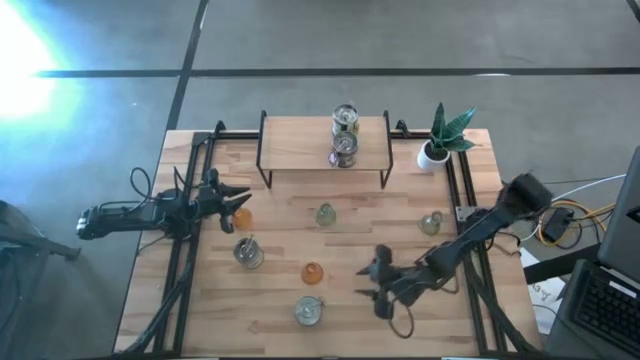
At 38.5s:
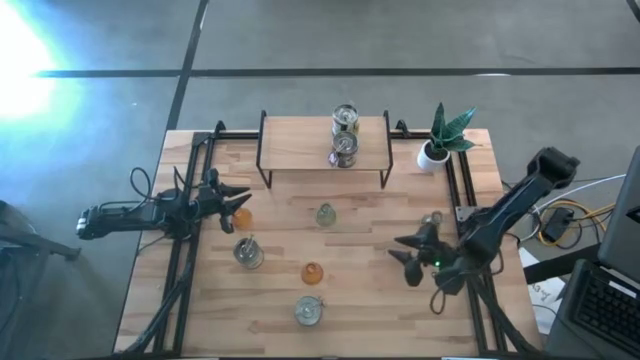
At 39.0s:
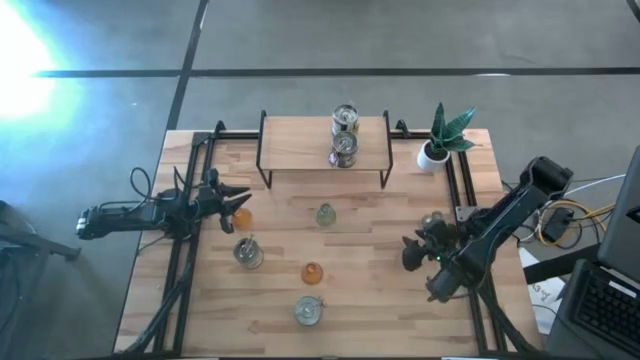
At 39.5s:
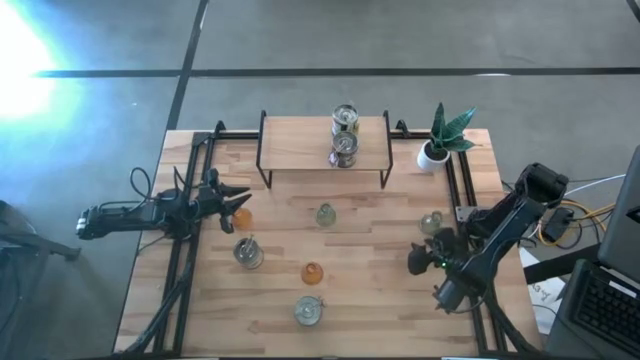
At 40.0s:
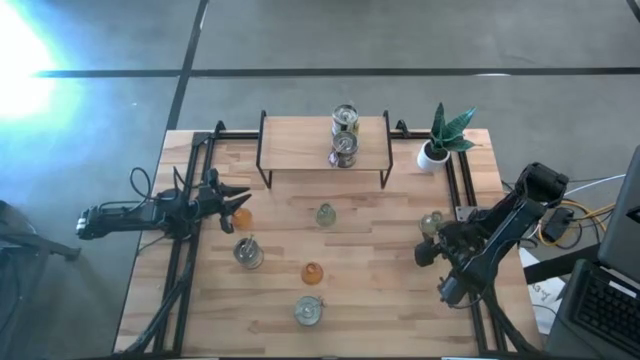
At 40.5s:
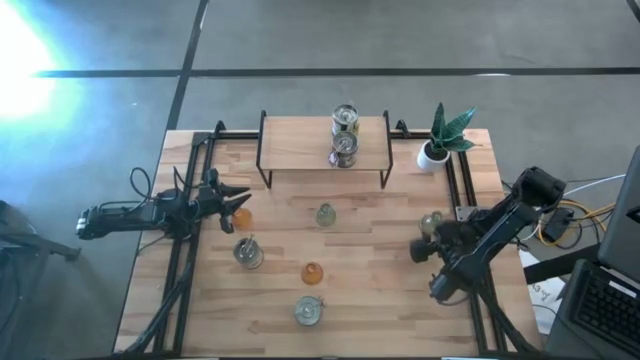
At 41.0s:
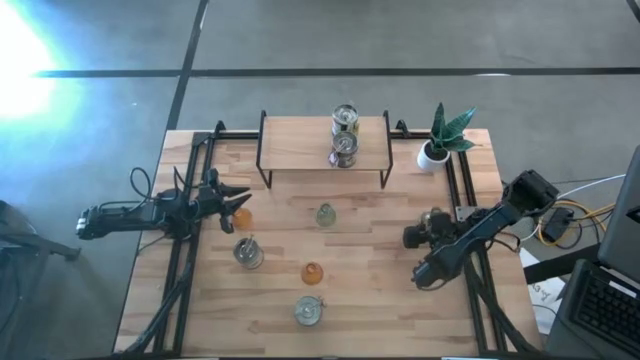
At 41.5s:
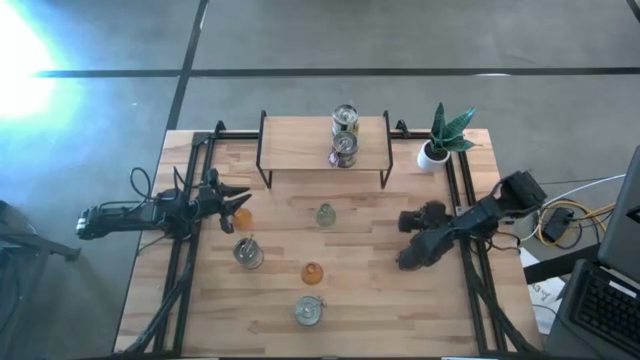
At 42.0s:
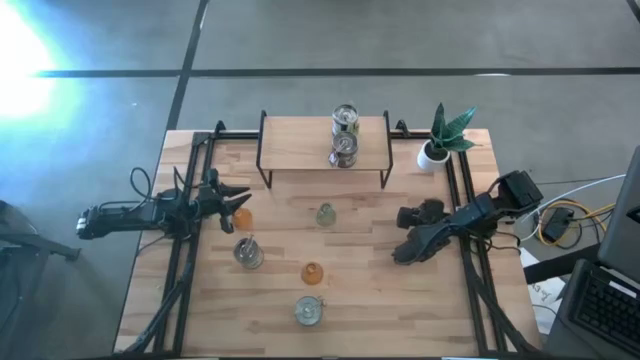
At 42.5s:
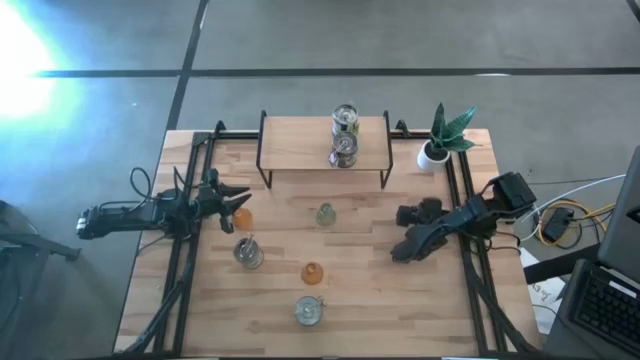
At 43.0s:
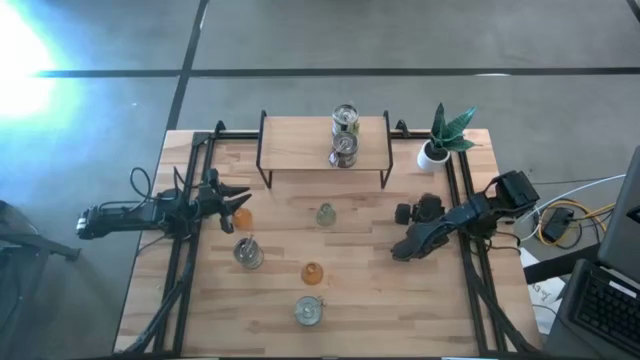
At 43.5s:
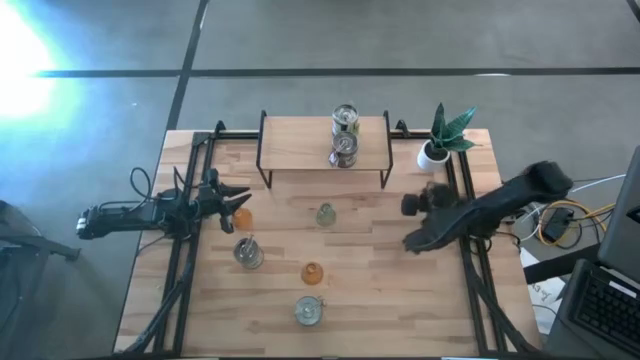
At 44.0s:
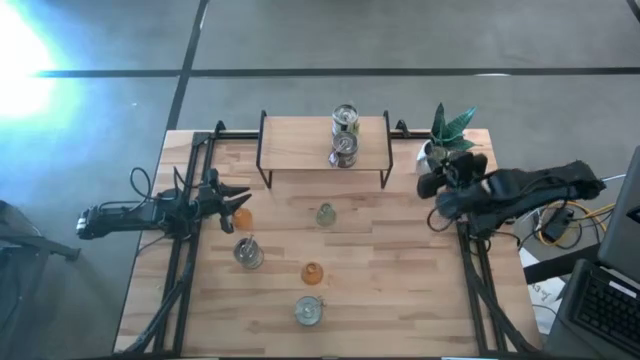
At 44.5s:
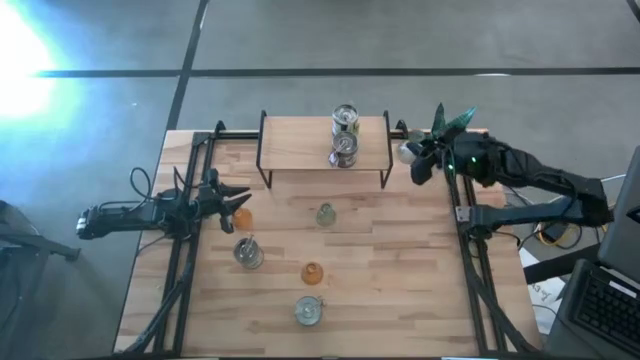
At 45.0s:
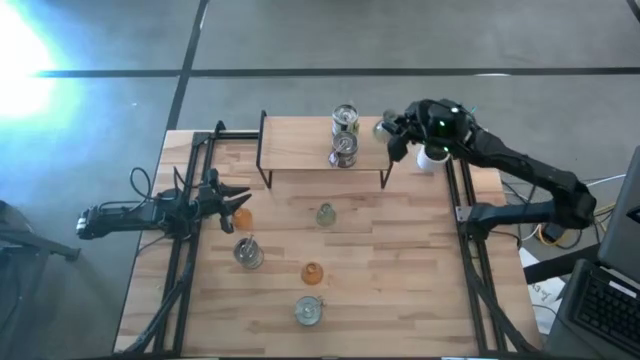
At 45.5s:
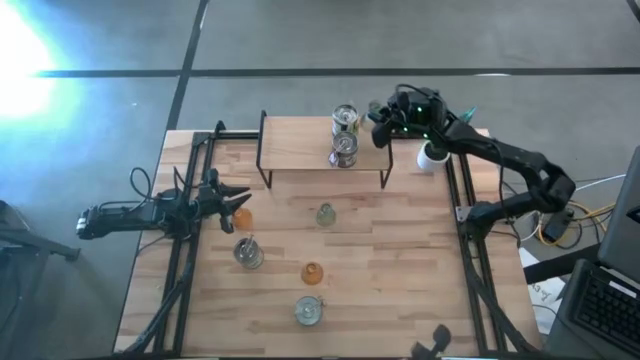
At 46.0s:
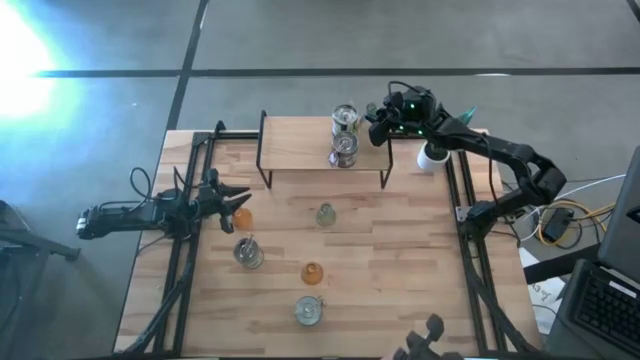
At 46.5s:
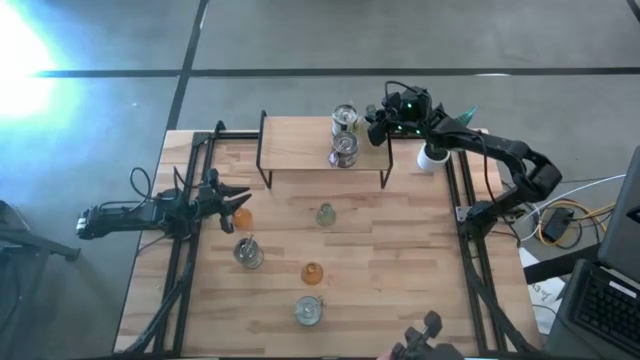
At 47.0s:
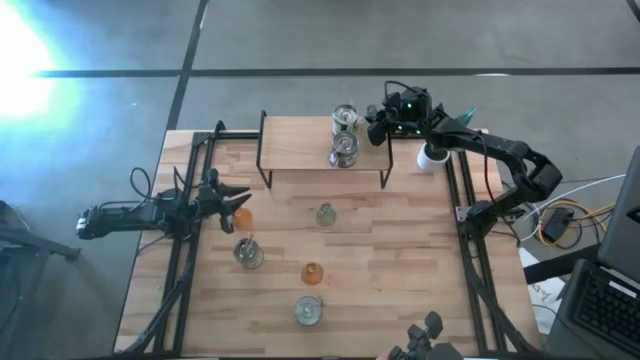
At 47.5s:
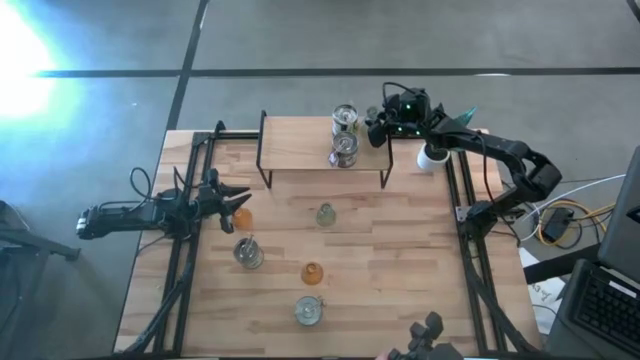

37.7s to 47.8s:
Task: Pick & Place candle stick holders
Put the right green candle holder on the shelf

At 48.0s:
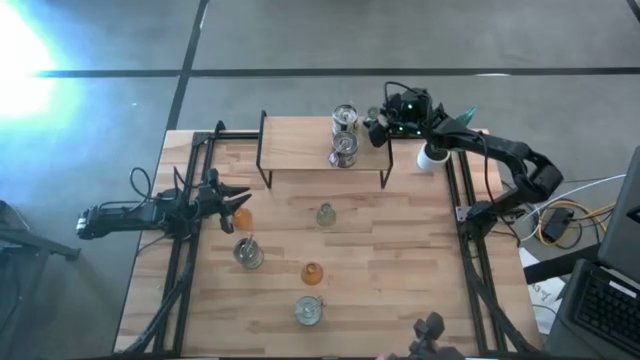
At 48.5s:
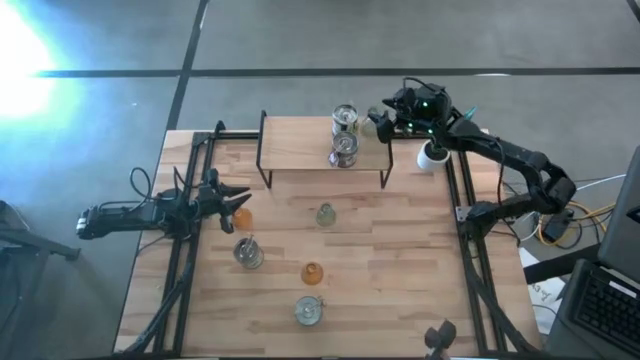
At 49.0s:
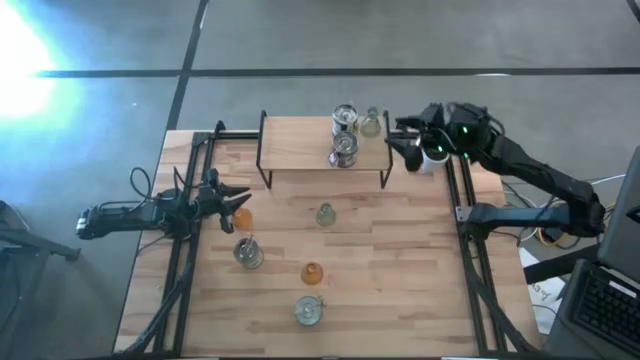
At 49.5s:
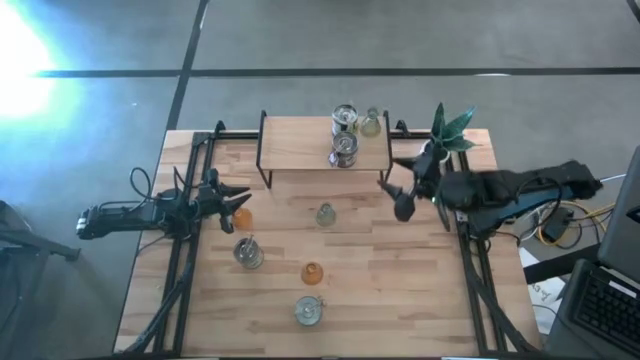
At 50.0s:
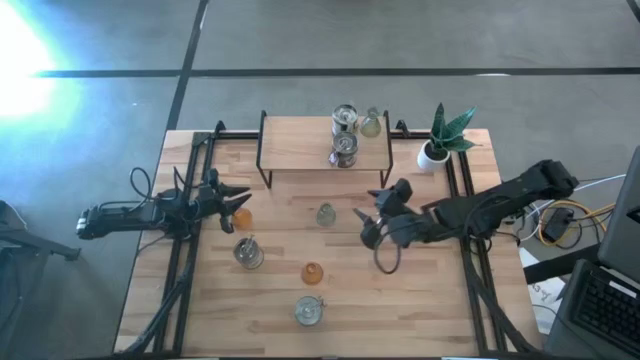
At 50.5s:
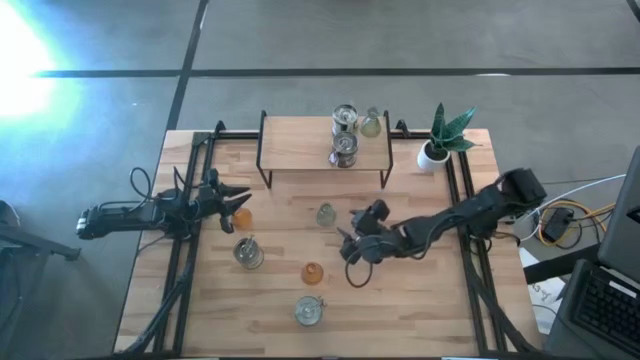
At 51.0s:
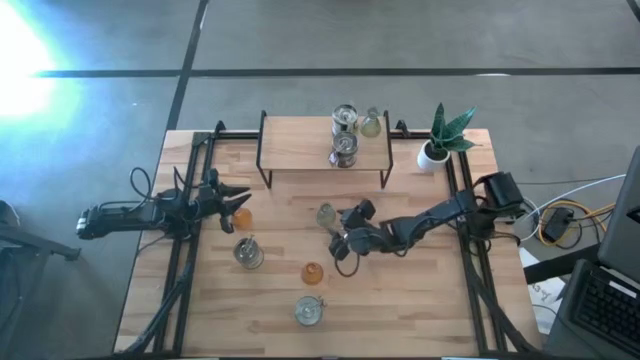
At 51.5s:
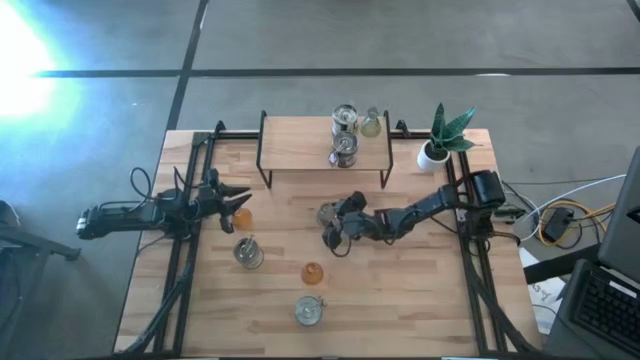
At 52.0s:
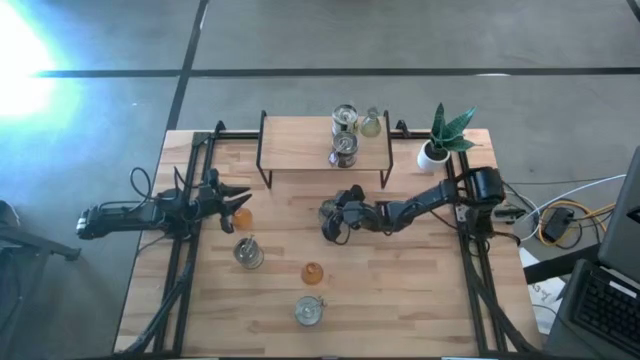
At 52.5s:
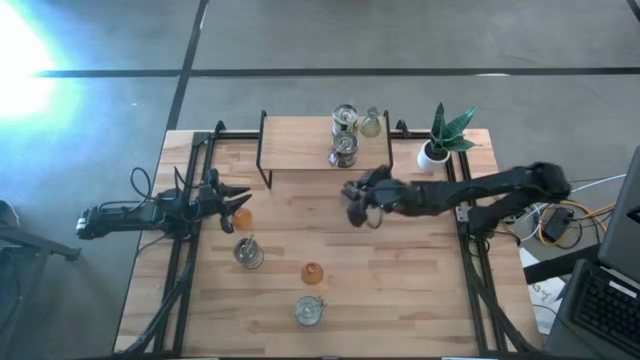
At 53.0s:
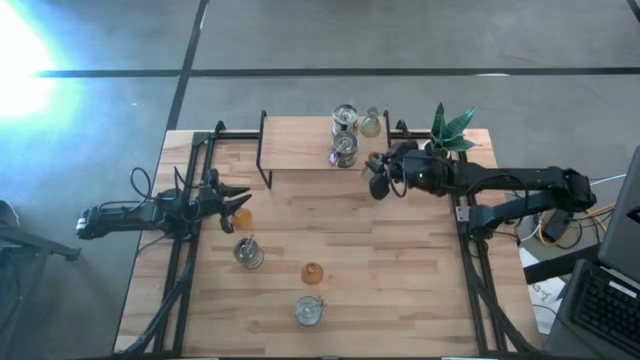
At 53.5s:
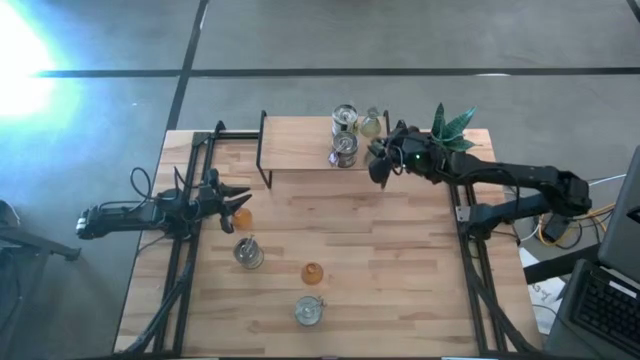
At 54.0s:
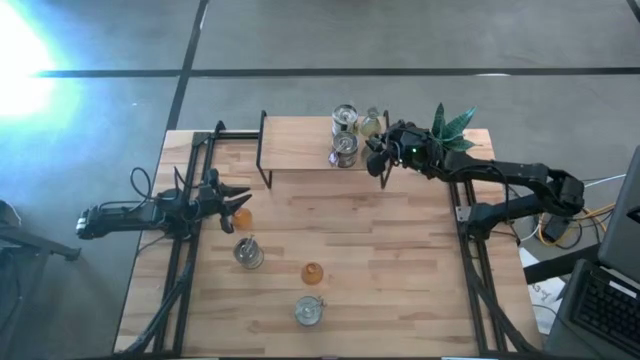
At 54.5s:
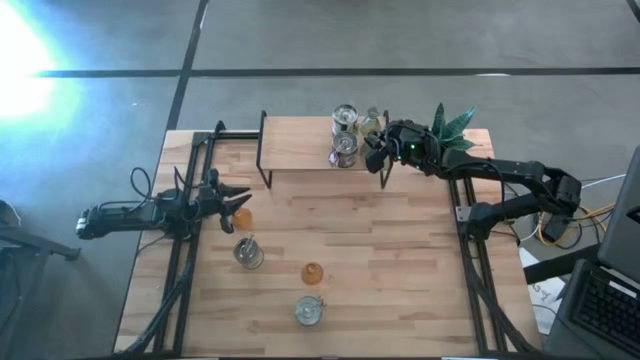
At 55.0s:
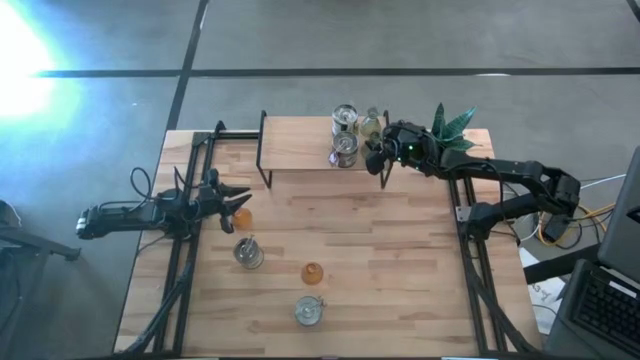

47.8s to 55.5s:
Align the green candle holder with the other green candle holder on the shelf

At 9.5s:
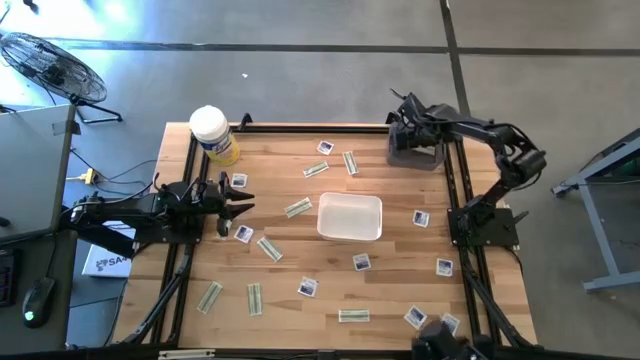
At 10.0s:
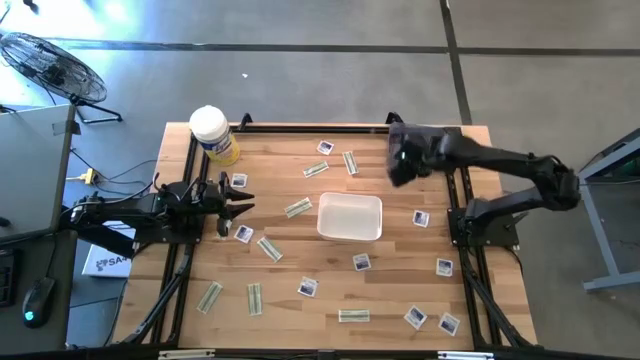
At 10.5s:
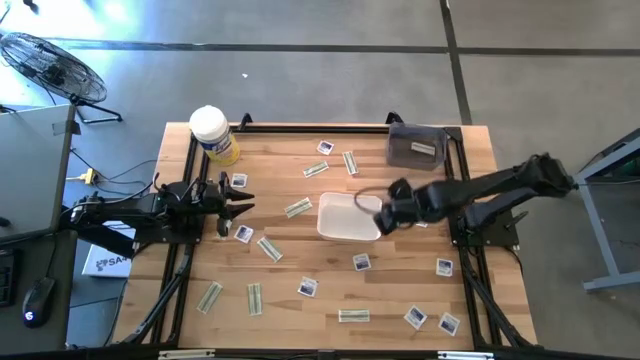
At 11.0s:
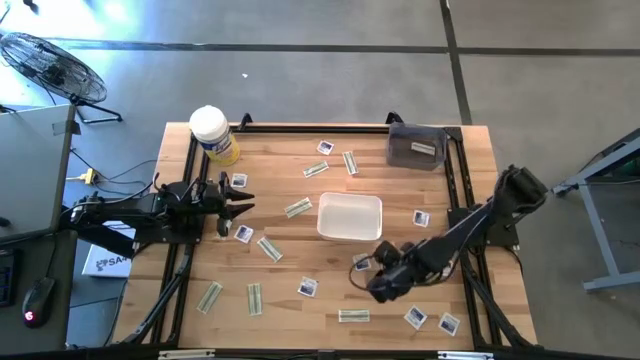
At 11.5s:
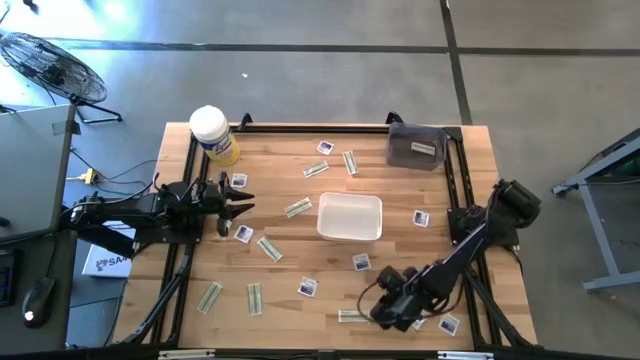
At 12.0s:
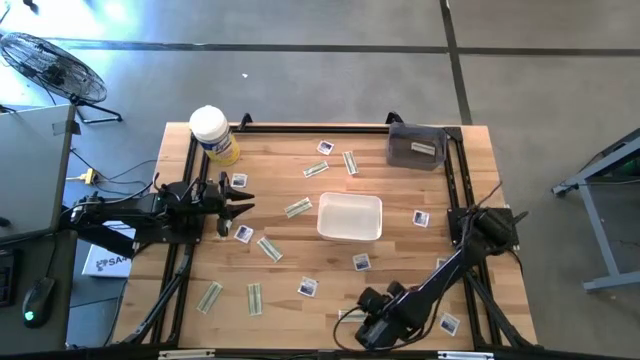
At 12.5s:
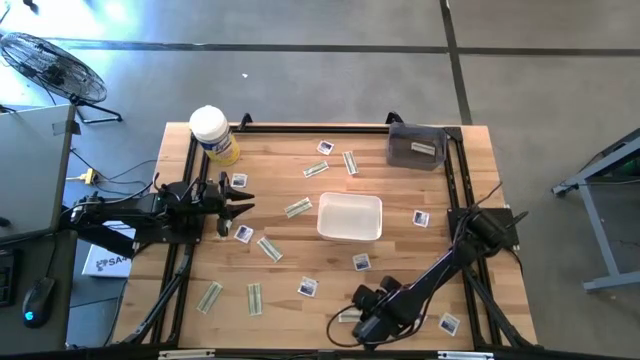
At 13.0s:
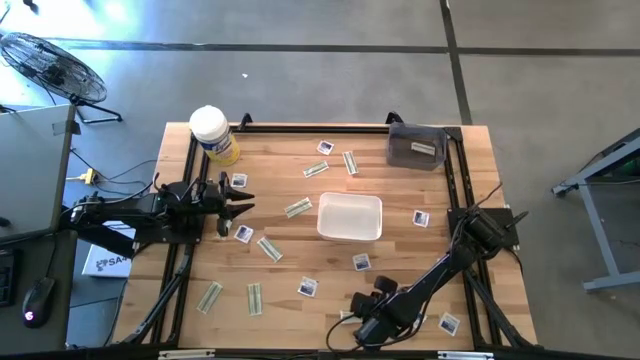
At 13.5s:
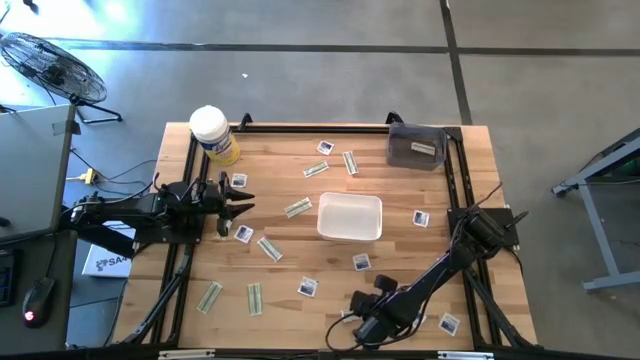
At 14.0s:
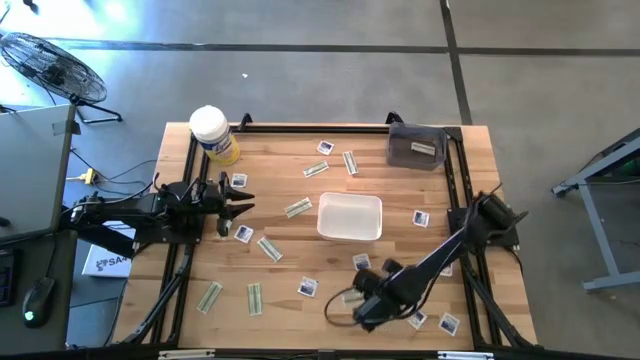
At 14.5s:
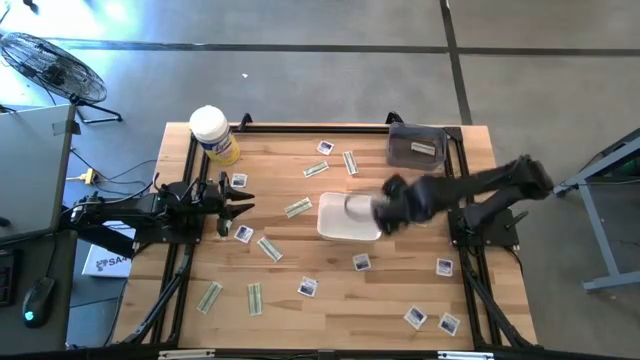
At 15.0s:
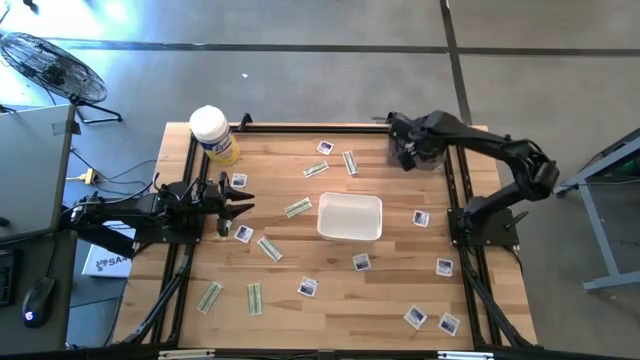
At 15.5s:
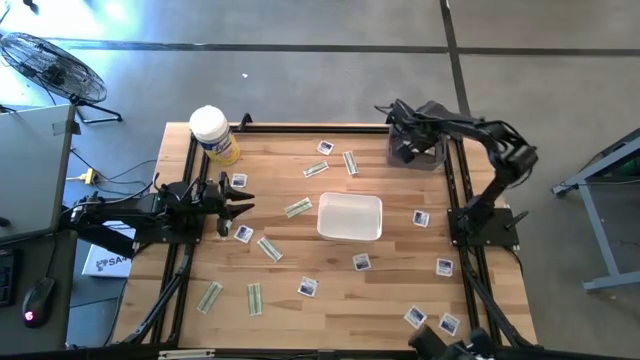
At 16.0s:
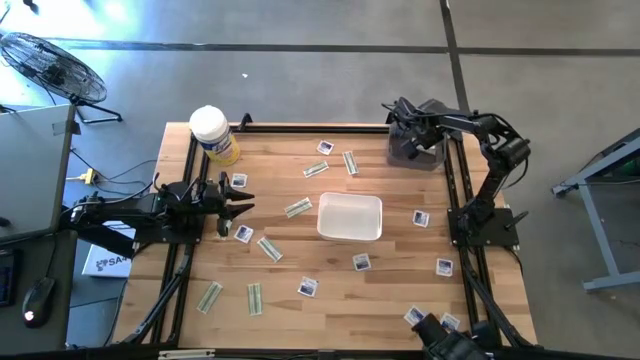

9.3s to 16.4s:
Task: Pick & Place First Aid Supplies
Put the green bandage into the black bin
